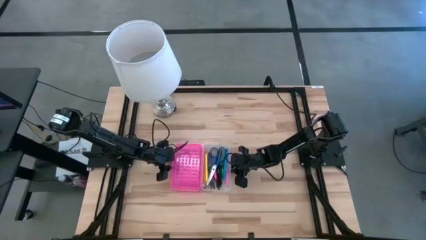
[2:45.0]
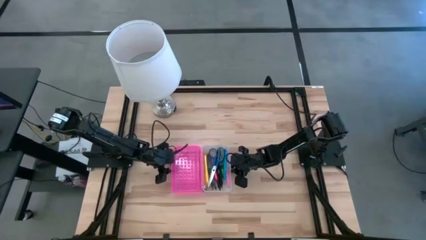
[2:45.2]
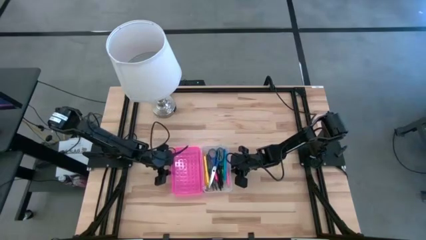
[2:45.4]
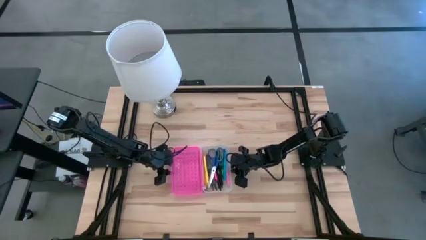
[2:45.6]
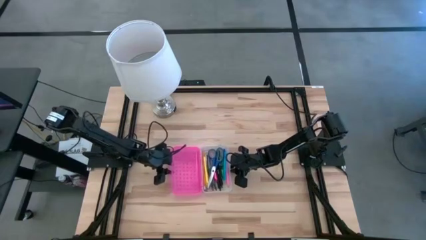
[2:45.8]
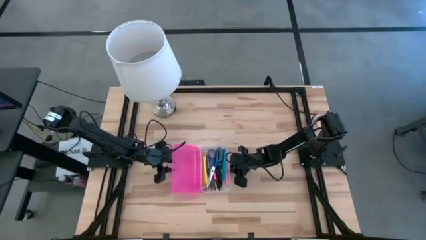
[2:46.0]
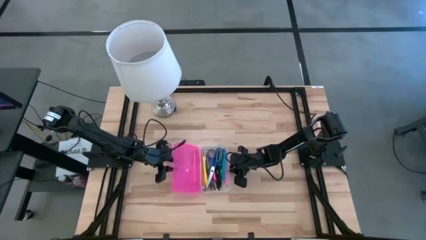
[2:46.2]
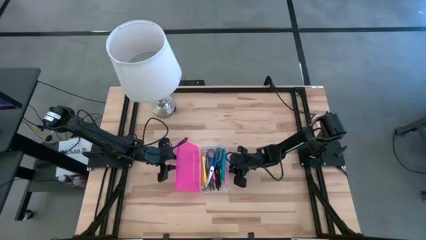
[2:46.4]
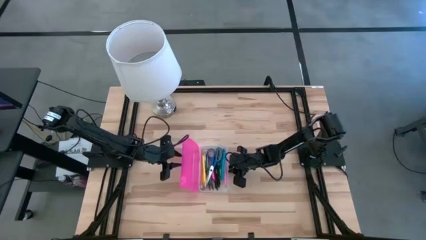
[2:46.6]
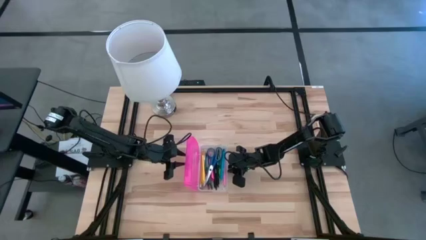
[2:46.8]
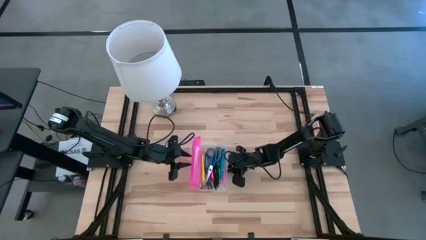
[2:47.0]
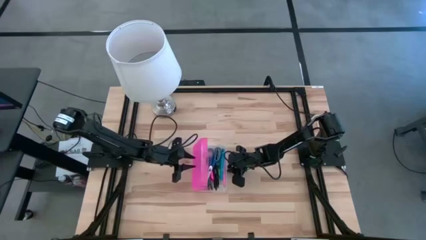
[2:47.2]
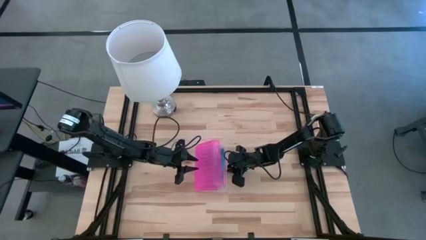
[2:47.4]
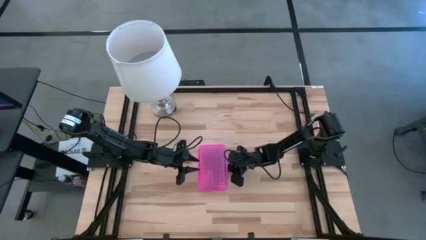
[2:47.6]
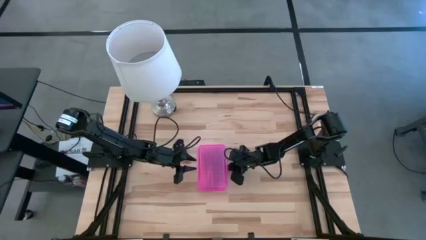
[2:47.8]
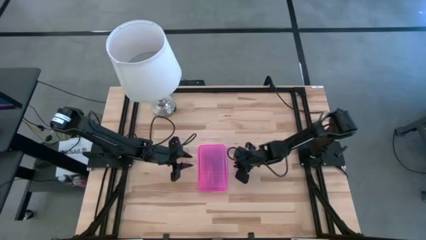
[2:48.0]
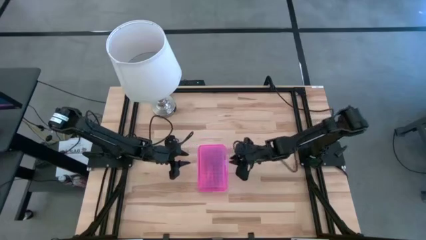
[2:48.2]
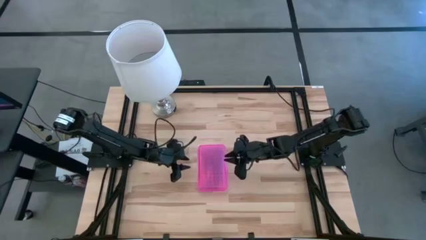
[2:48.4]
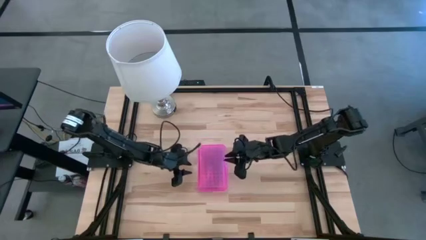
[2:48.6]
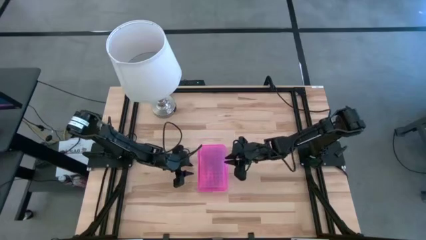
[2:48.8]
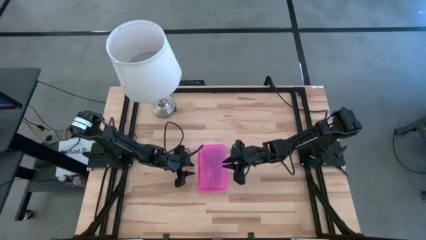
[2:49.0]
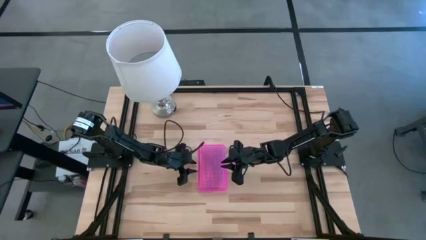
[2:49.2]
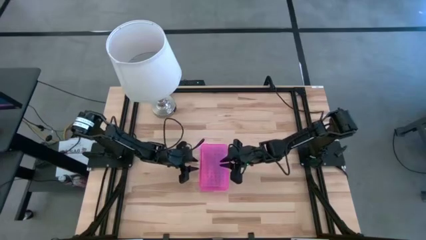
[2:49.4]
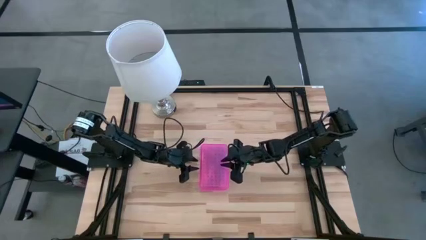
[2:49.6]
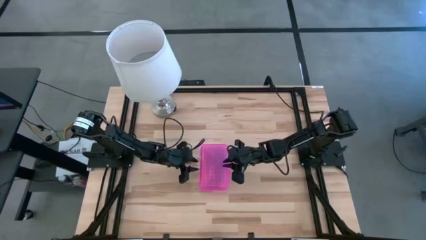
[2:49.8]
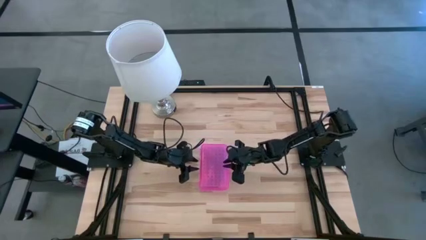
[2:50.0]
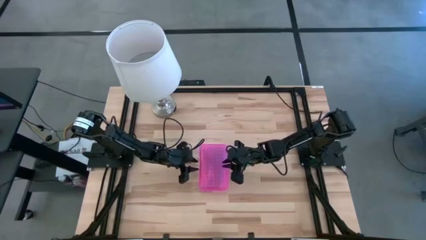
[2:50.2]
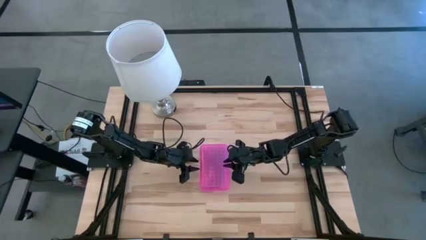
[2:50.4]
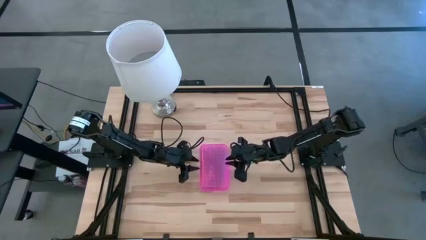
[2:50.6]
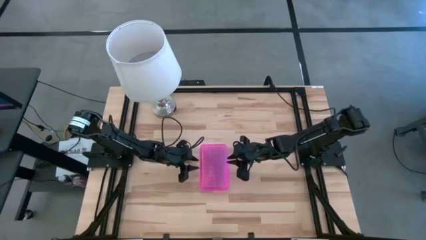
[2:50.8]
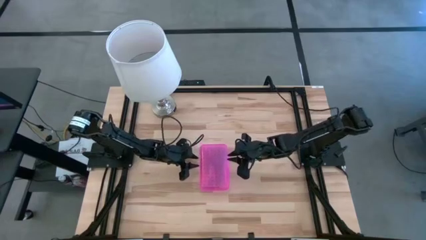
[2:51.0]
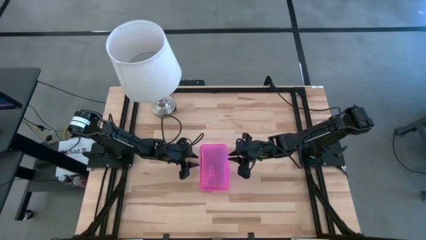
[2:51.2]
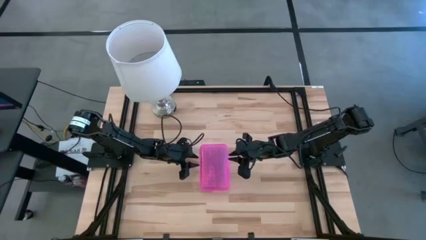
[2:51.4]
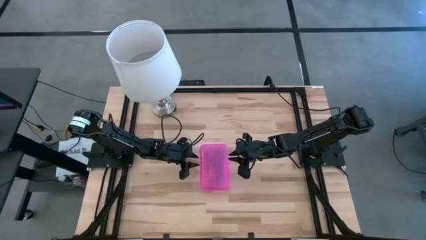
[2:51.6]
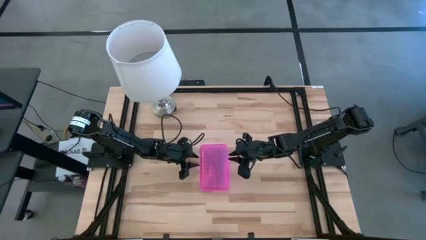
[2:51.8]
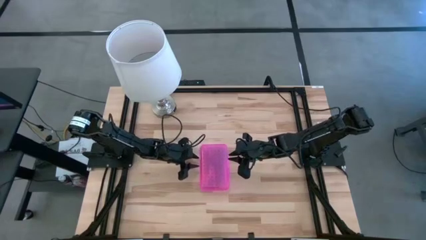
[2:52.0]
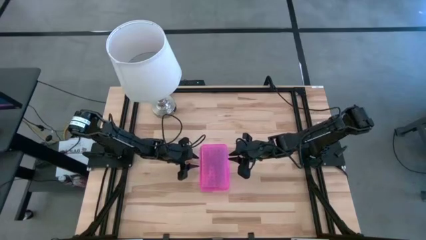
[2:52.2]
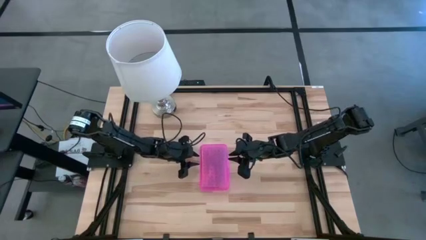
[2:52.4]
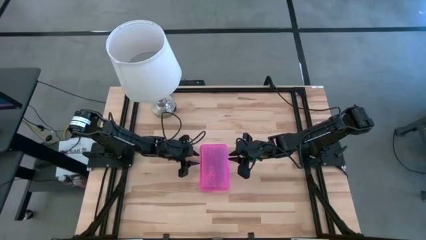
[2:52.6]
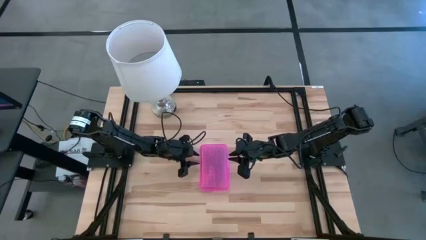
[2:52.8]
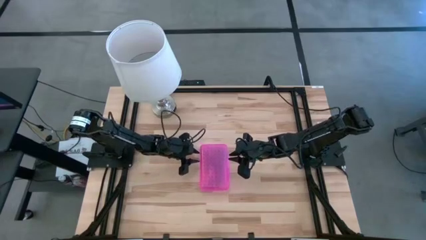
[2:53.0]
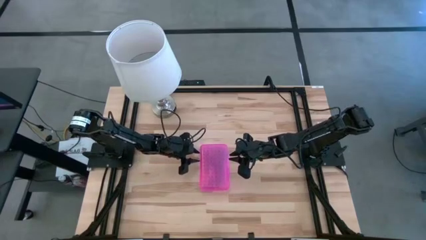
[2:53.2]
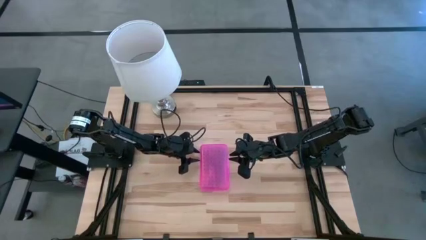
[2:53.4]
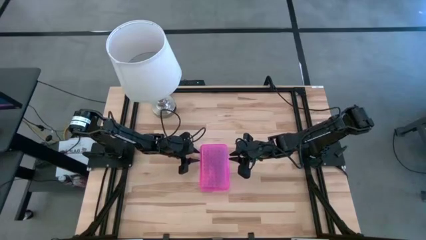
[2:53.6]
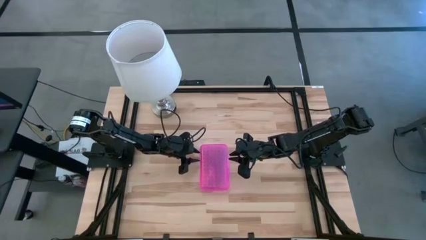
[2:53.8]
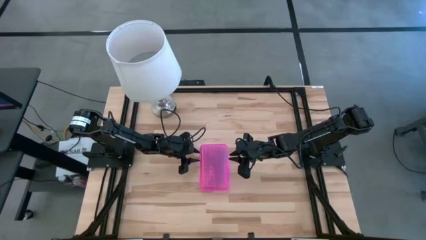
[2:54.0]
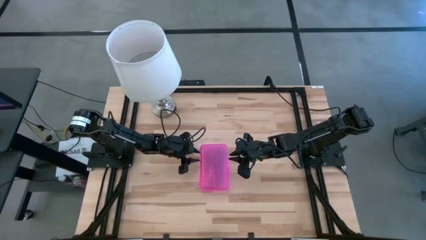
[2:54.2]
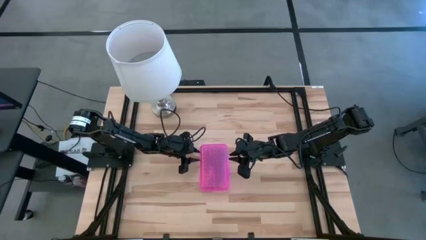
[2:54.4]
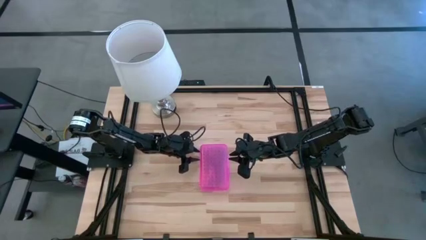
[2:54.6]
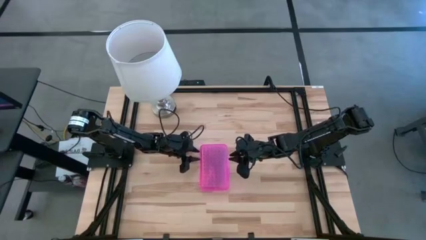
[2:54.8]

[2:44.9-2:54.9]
Task: Pick & place school supplies into a supply box
Close the supply box

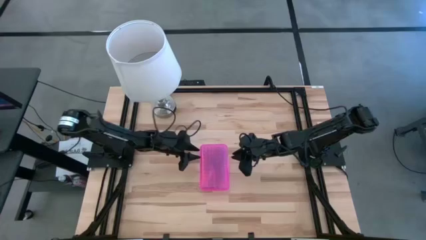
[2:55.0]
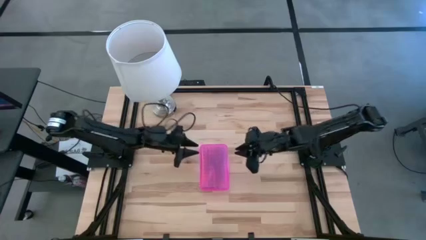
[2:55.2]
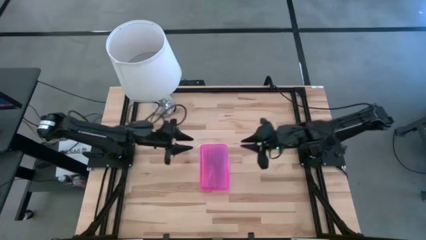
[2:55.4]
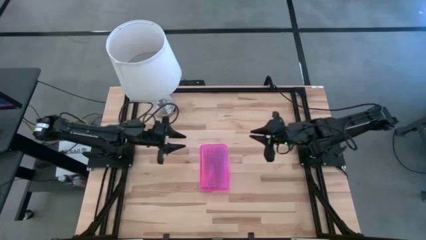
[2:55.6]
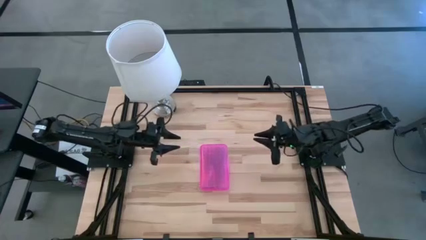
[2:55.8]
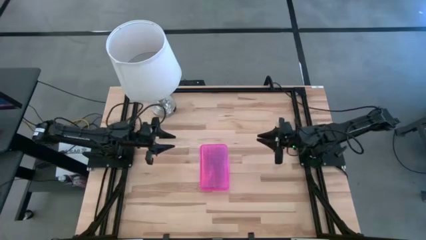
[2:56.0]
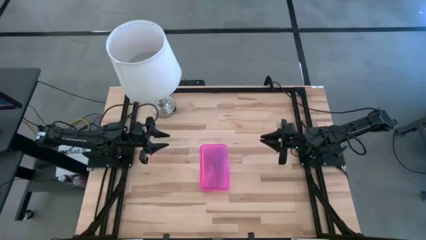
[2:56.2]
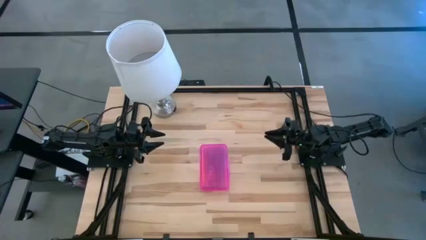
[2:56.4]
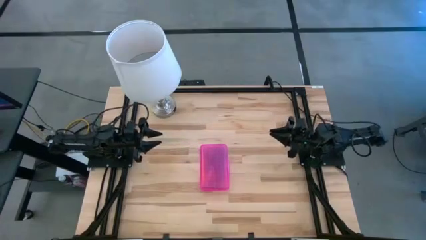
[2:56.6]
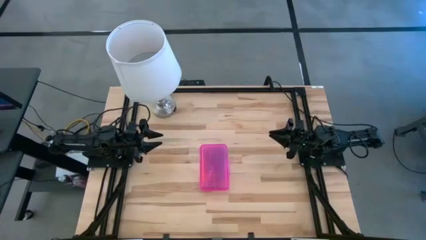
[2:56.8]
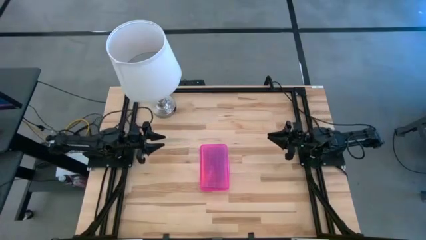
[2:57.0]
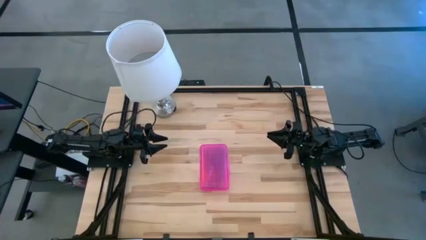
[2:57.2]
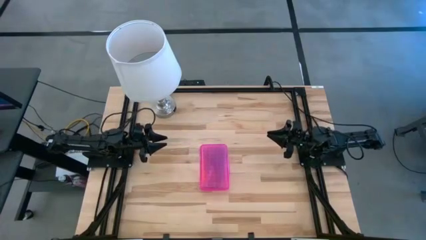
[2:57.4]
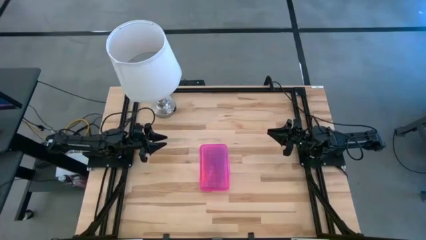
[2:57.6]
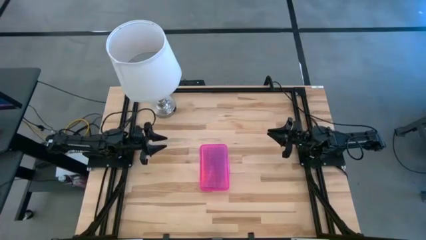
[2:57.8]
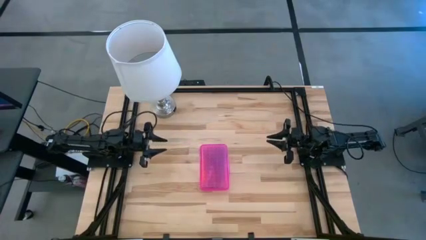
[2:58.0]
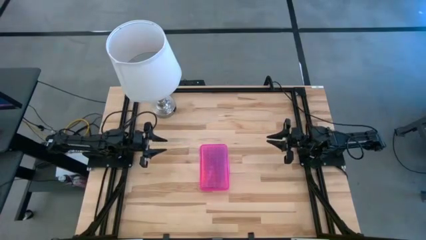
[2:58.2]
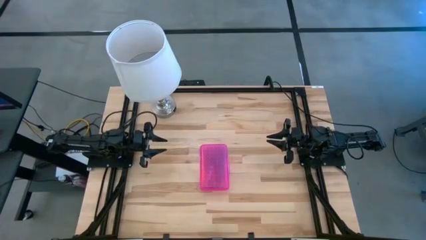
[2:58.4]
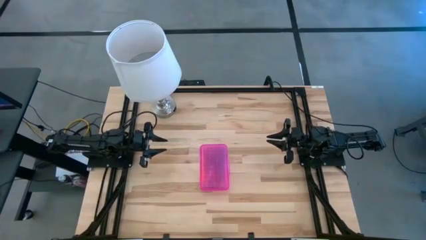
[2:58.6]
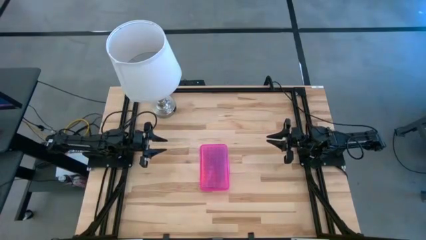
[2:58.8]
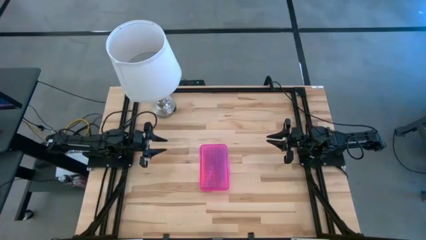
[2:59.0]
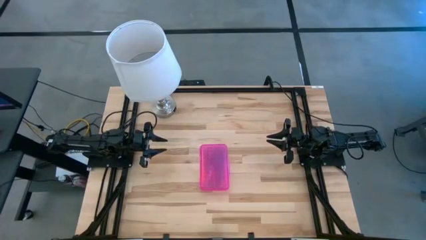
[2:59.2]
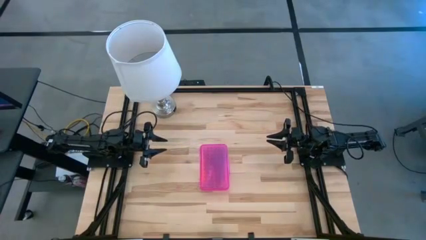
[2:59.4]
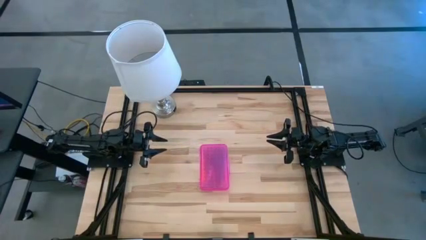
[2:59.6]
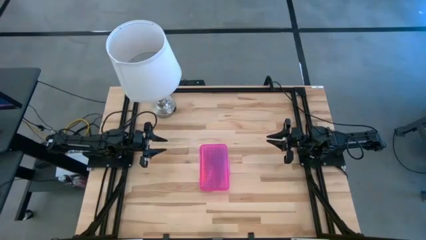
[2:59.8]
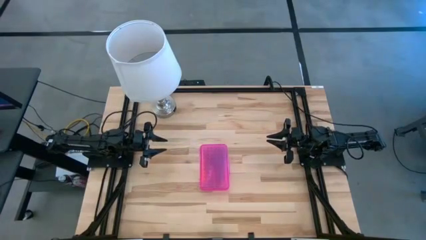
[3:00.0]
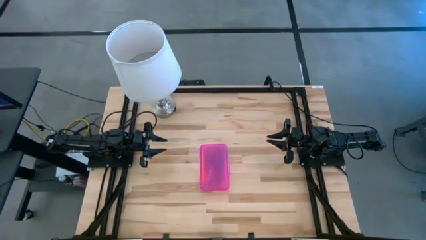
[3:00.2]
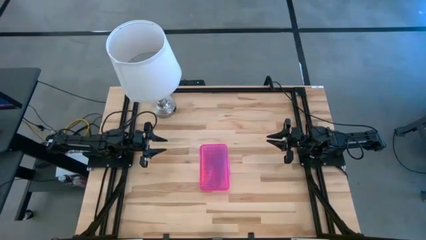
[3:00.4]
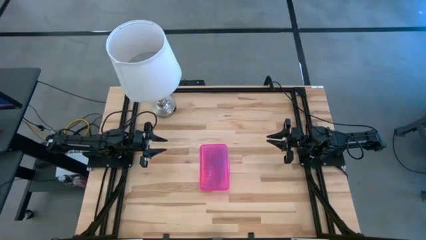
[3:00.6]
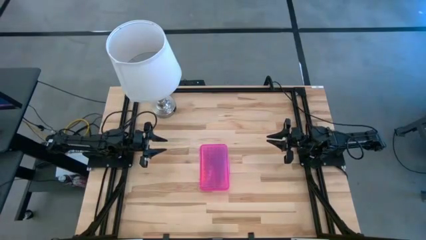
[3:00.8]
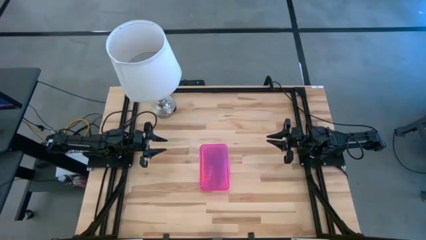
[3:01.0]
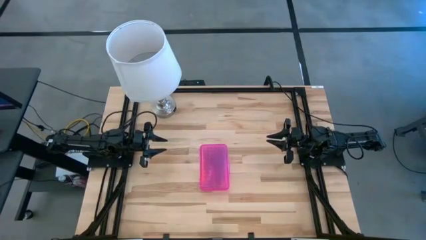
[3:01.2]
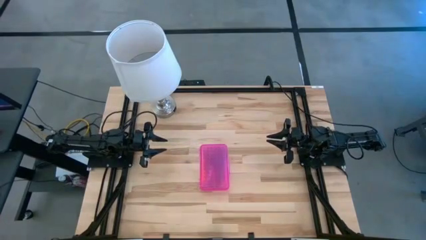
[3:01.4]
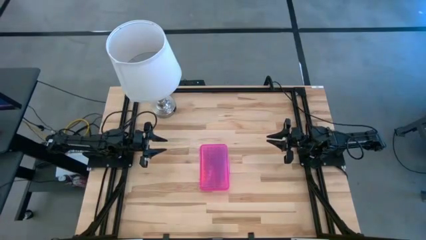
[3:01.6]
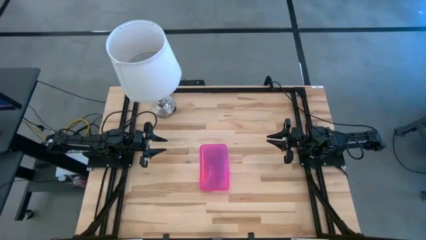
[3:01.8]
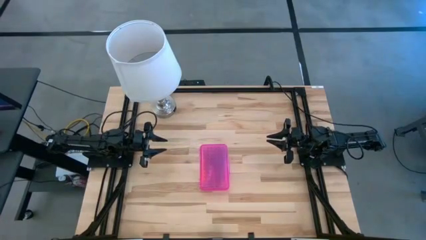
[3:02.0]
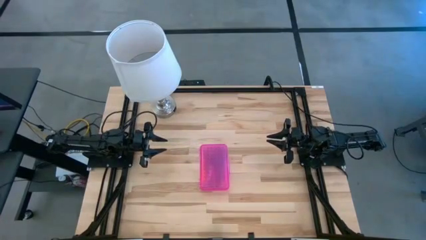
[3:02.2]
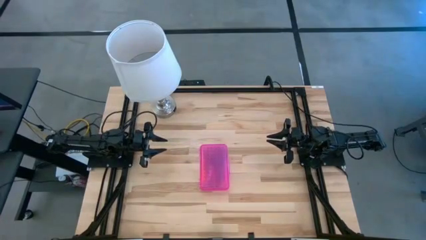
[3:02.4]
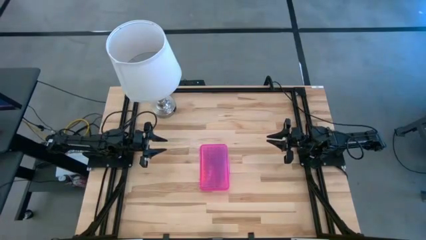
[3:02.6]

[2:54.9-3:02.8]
Return to Home Position
